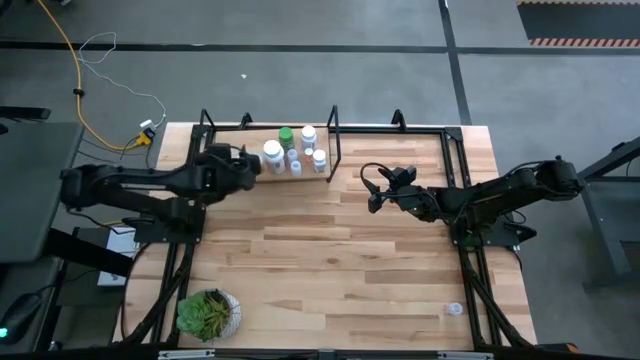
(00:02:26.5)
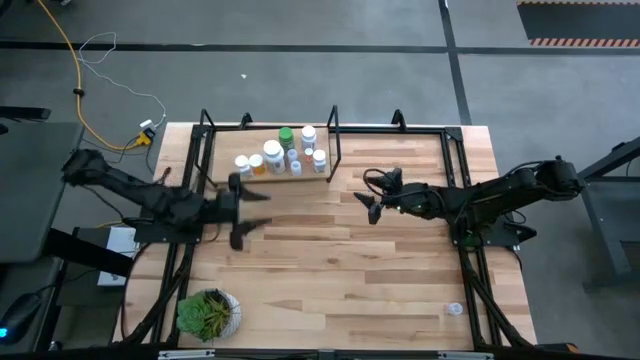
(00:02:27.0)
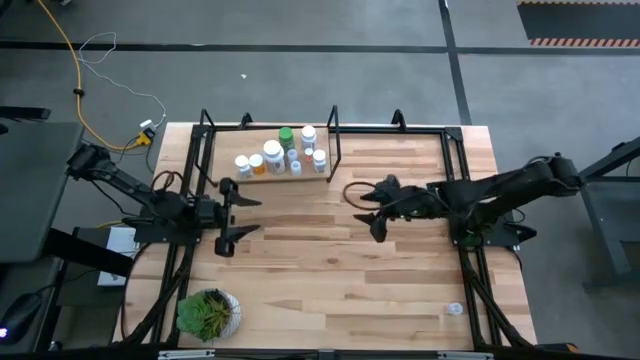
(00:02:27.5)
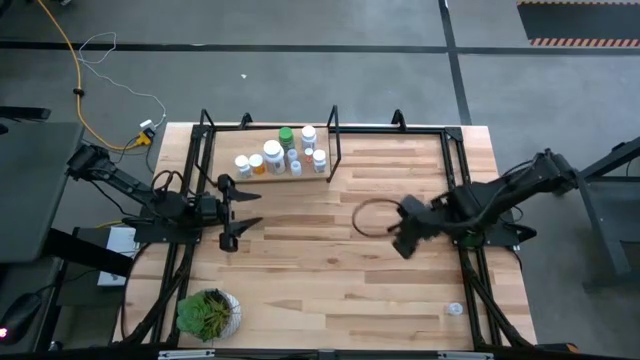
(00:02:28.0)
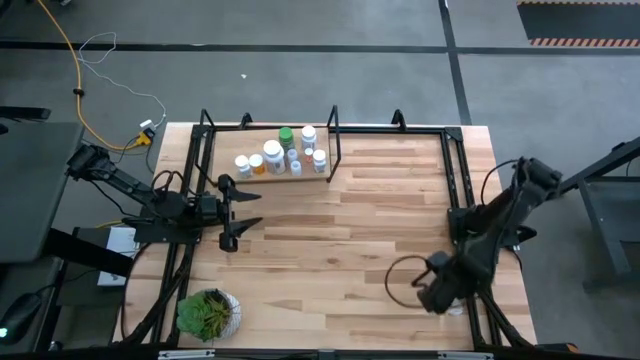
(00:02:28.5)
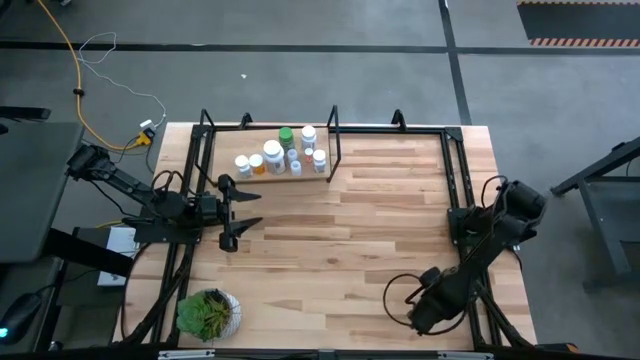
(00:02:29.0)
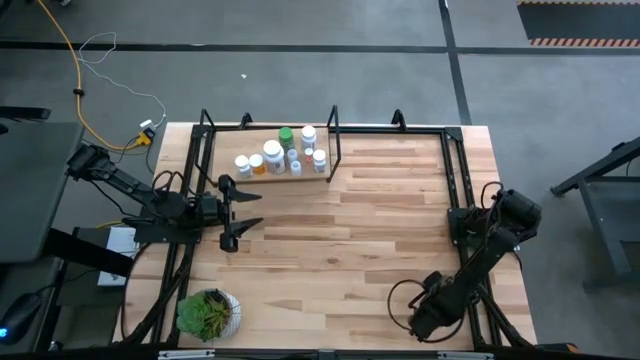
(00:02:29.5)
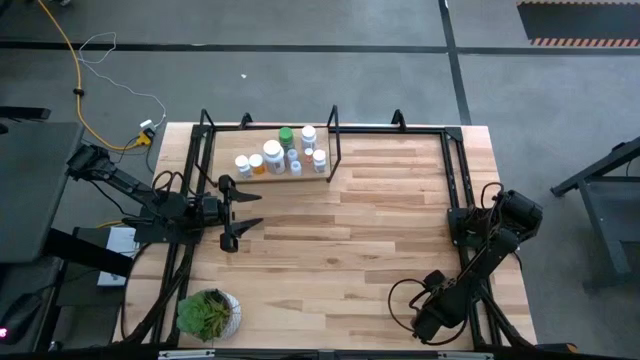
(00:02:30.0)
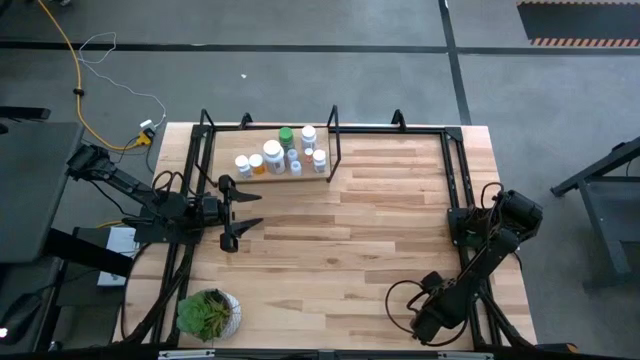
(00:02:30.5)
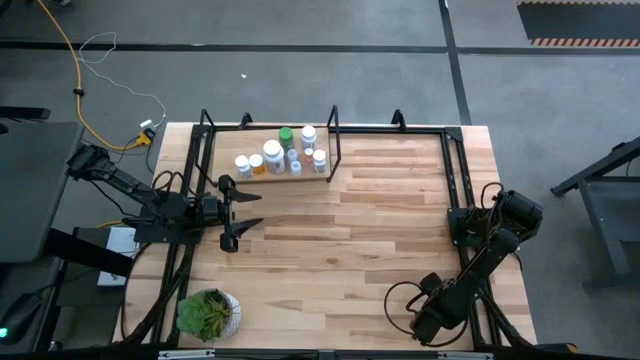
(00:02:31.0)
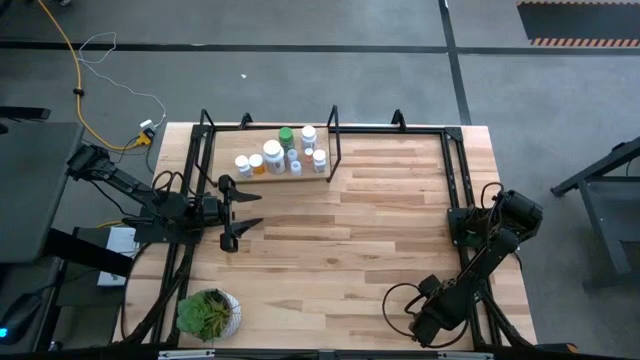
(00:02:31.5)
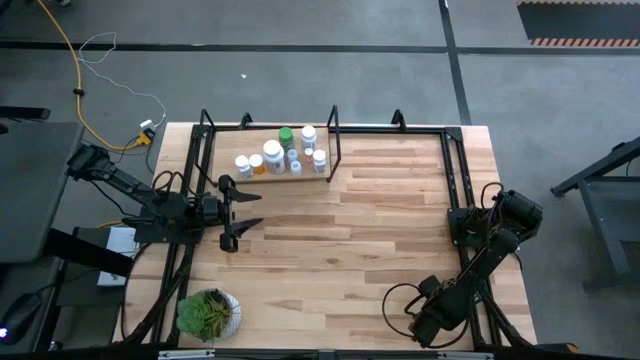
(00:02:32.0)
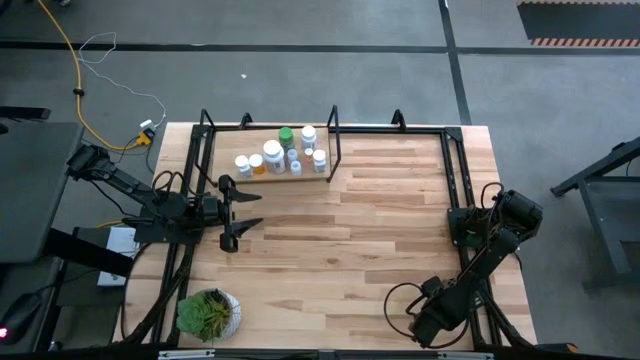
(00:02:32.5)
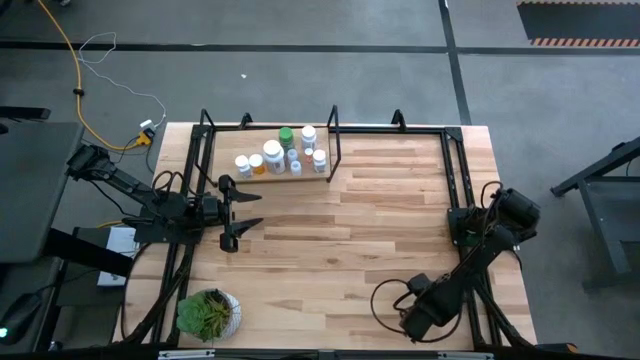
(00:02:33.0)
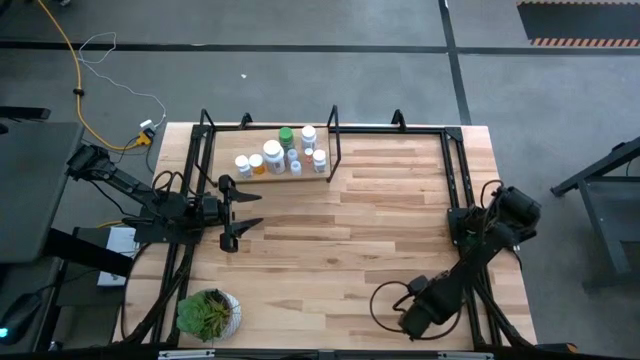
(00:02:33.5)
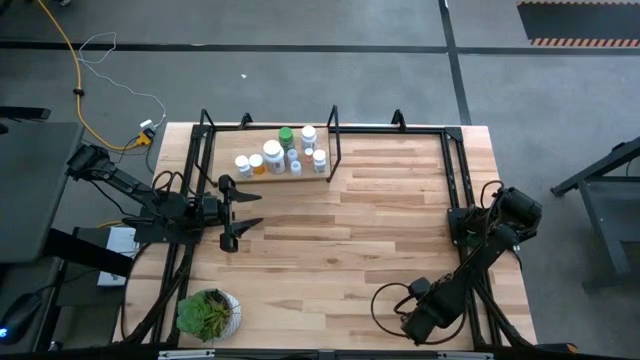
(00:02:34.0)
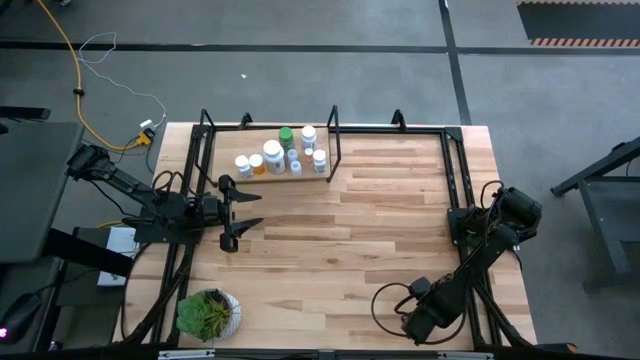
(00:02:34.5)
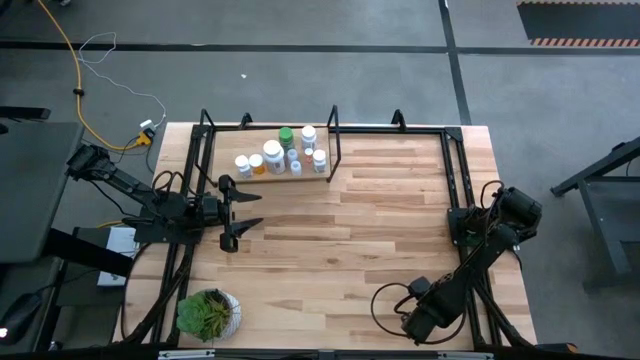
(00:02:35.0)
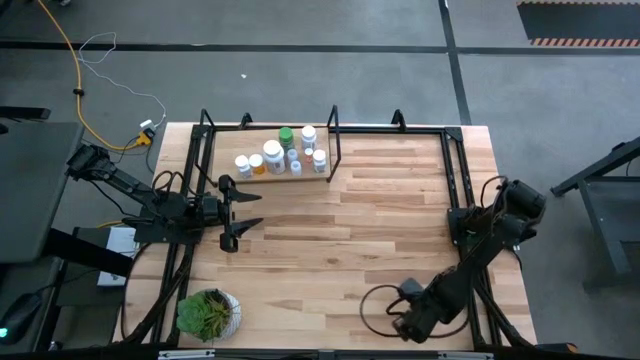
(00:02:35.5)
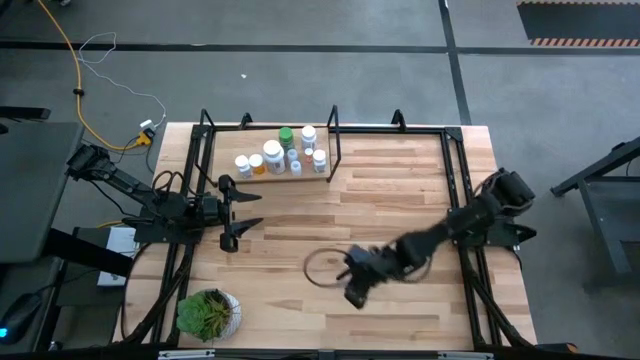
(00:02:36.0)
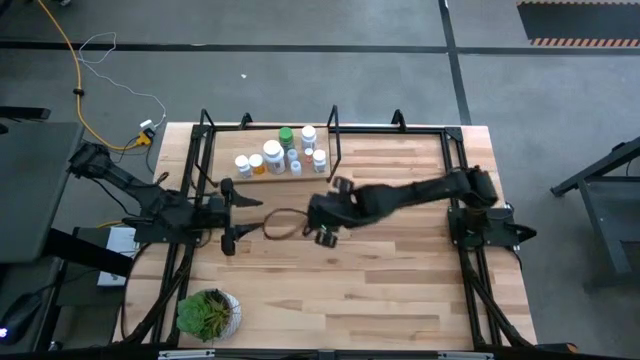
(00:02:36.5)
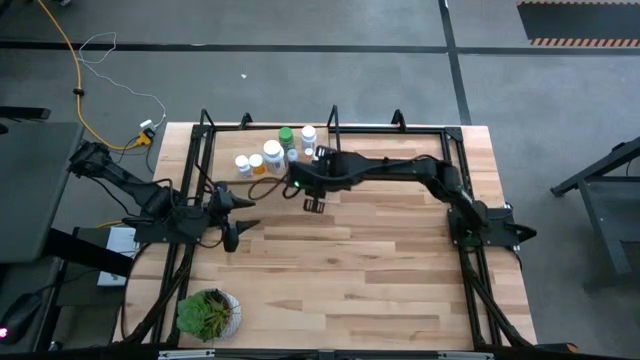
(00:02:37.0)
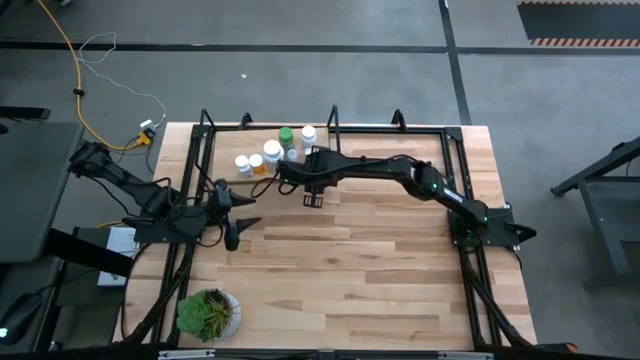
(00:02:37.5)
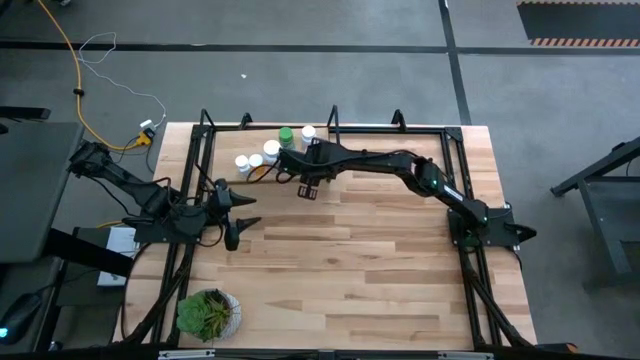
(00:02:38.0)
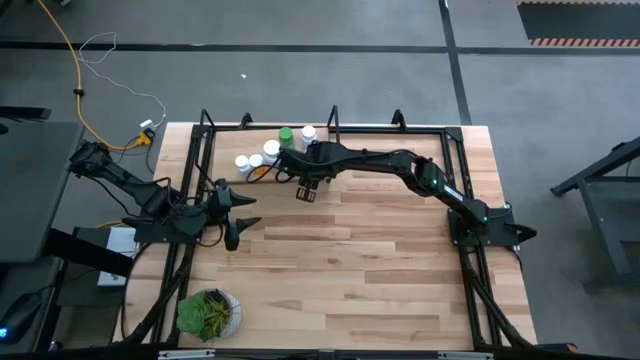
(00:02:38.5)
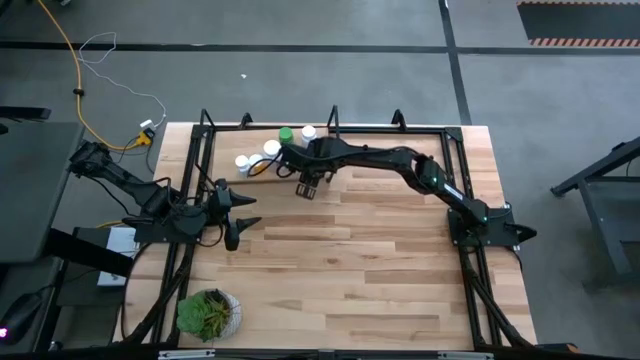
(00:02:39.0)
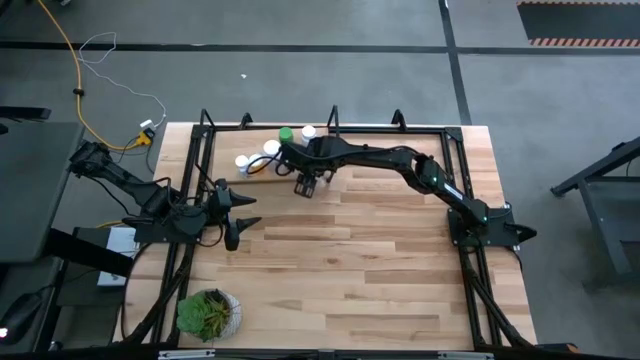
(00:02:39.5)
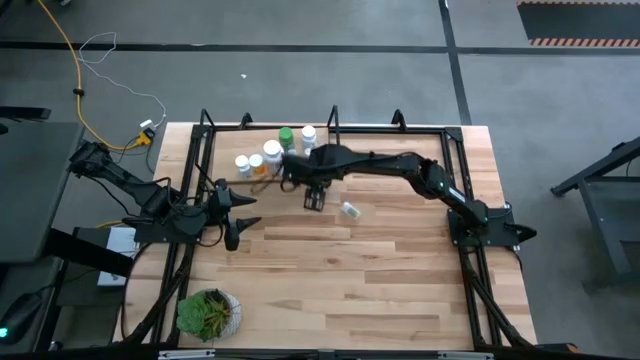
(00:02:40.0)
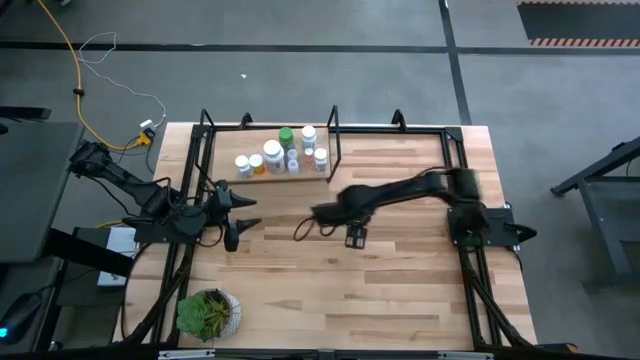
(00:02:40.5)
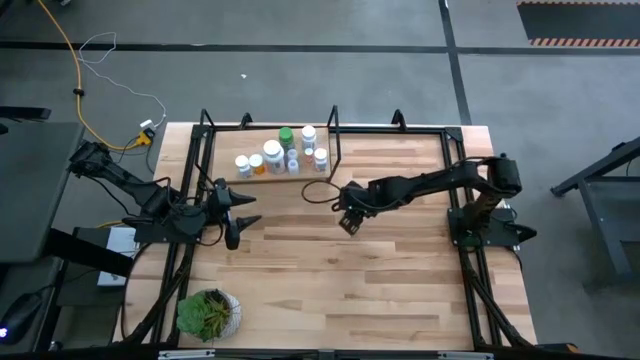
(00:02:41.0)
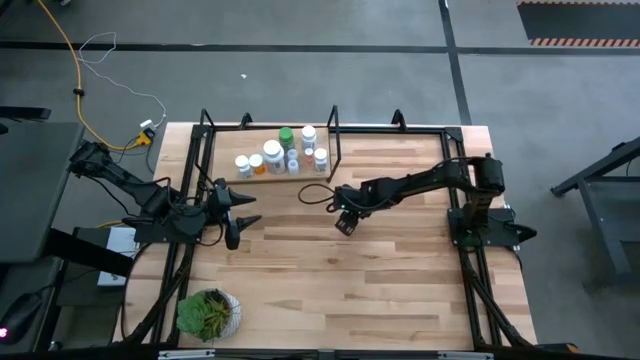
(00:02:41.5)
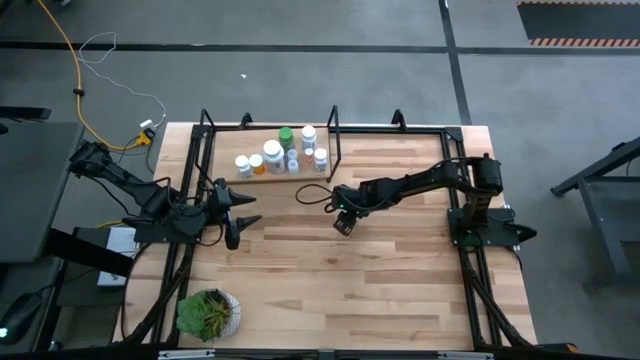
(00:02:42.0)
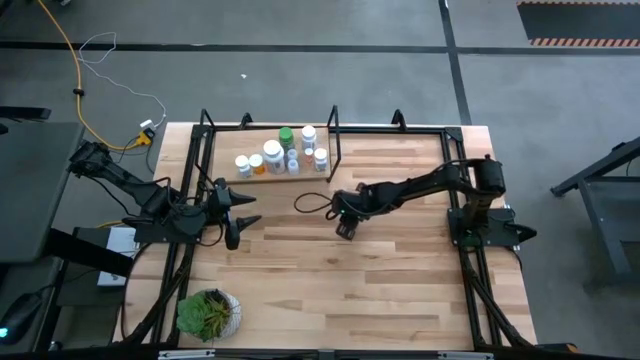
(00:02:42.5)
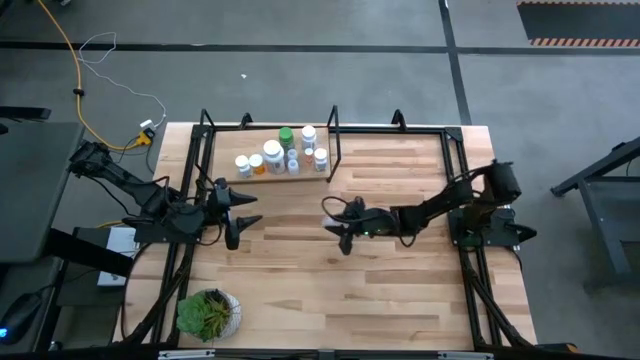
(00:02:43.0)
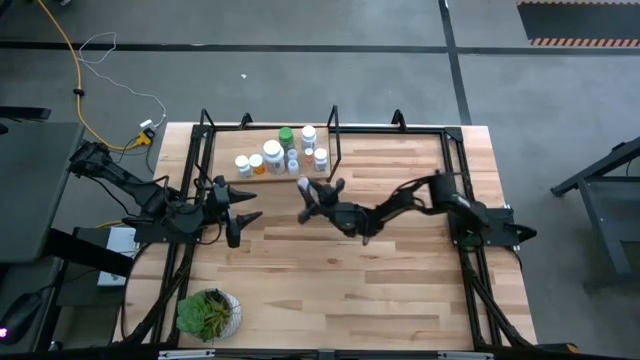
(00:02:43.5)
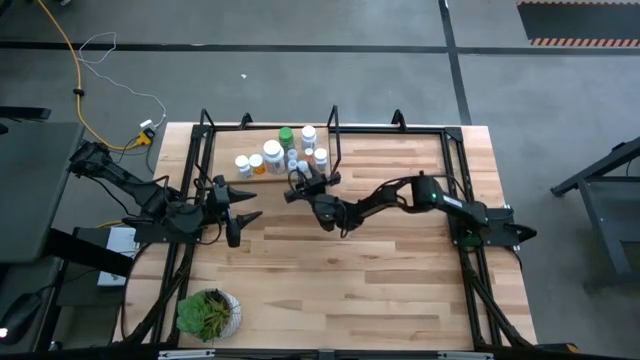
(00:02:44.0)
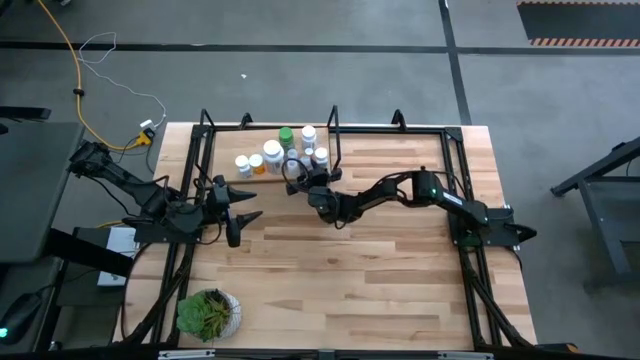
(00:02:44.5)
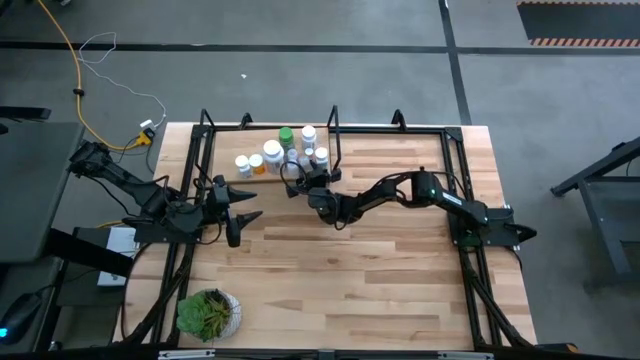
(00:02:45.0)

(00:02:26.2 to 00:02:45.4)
Task: Pick and place medicine bottles onto shelf by color
Put the small green pill bottle on the shelf

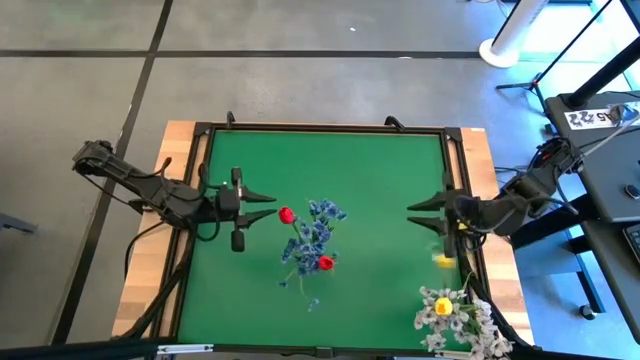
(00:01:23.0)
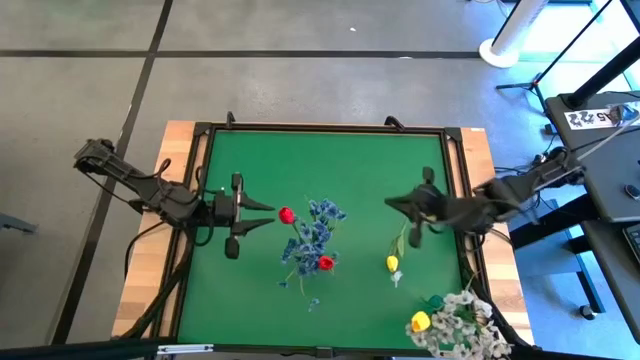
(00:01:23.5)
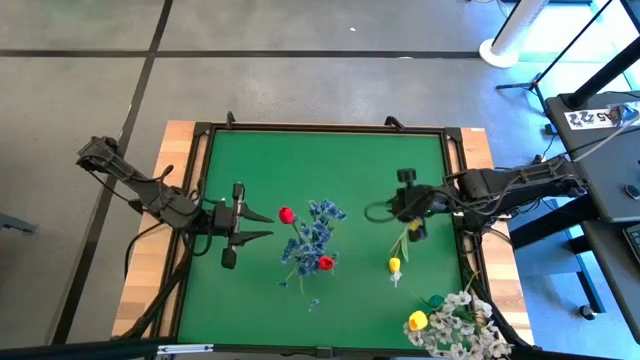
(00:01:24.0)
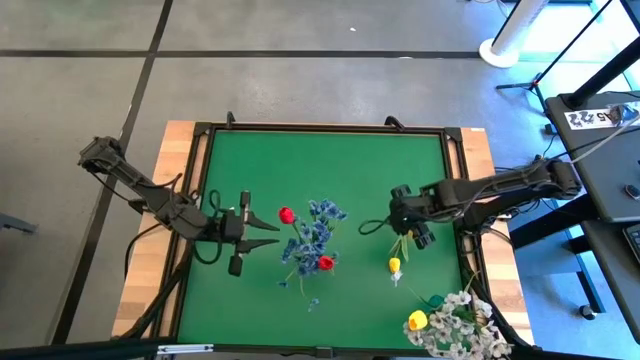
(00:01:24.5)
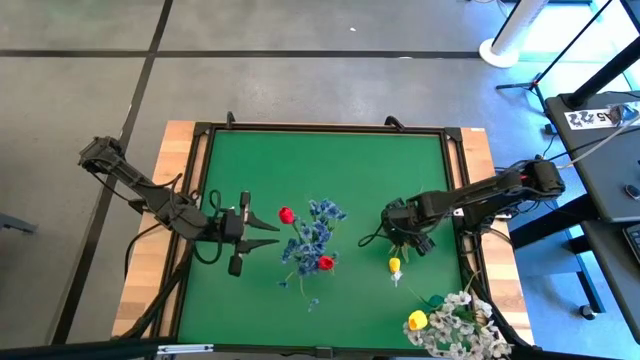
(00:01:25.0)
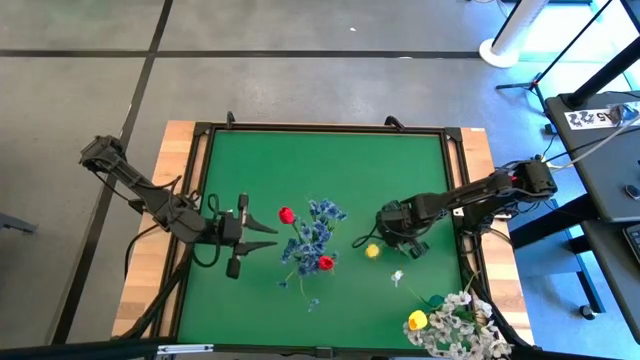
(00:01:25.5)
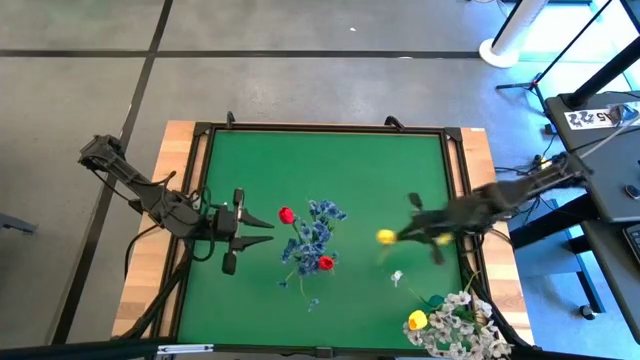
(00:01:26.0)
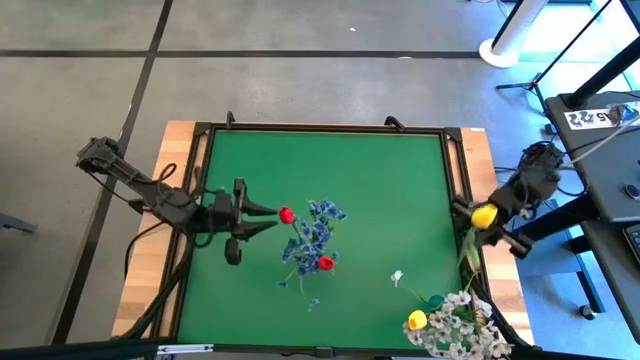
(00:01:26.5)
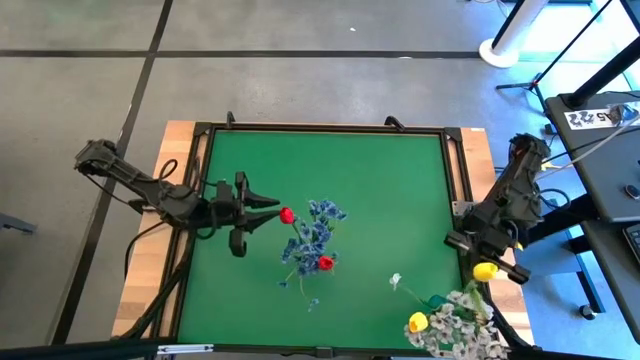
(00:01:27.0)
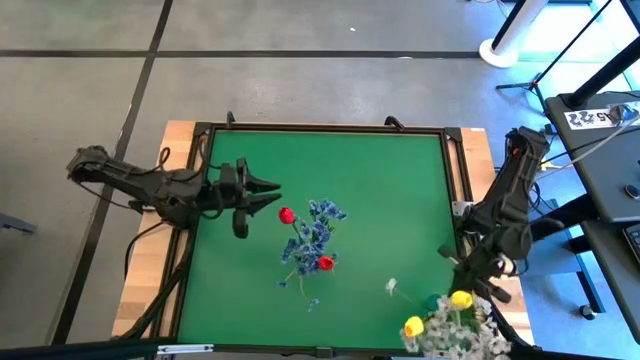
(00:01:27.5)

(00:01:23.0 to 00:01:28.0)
Task: Sort flowers into vase by color
Put the yellow flower into the blue vase
